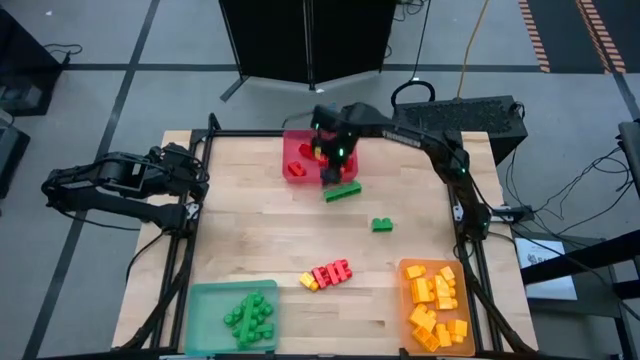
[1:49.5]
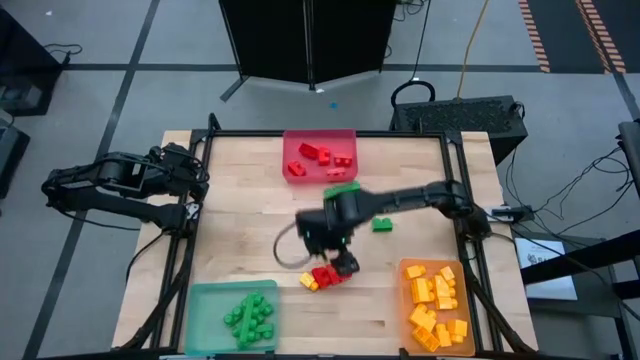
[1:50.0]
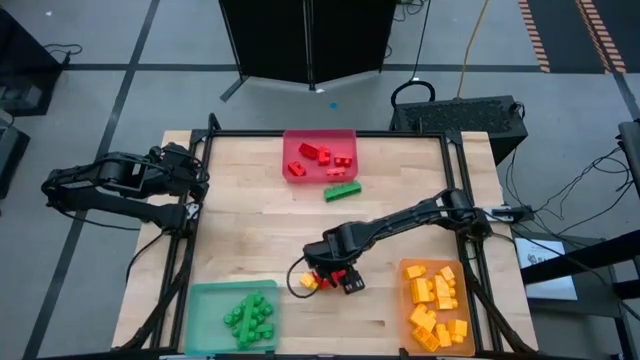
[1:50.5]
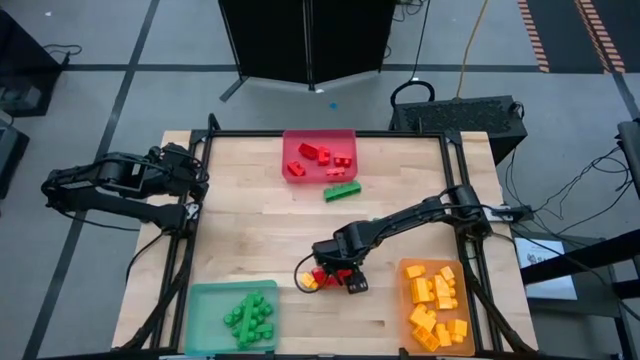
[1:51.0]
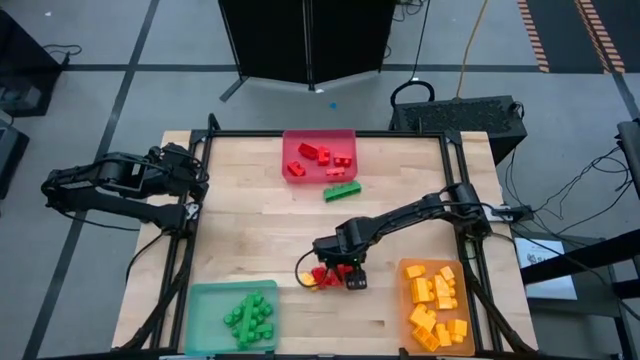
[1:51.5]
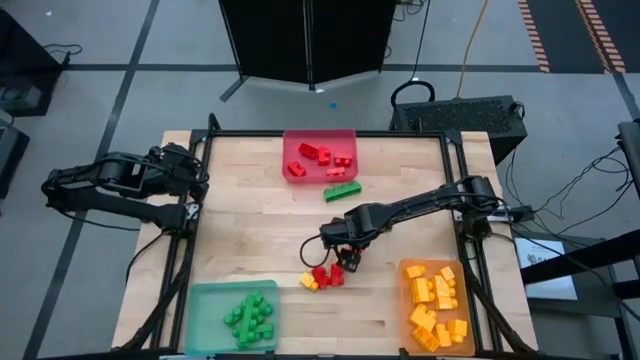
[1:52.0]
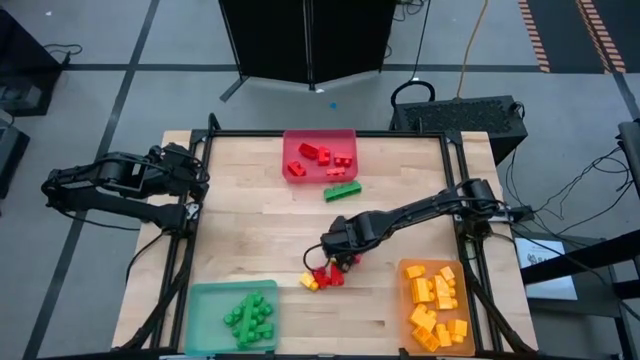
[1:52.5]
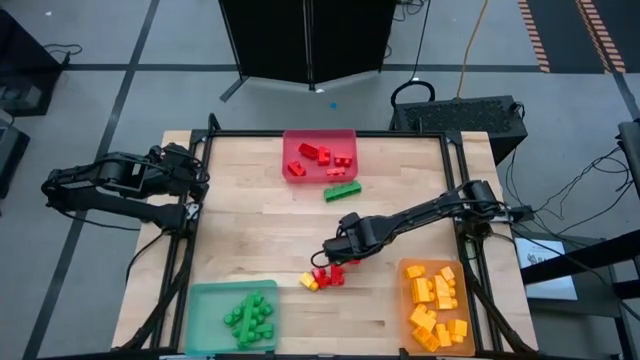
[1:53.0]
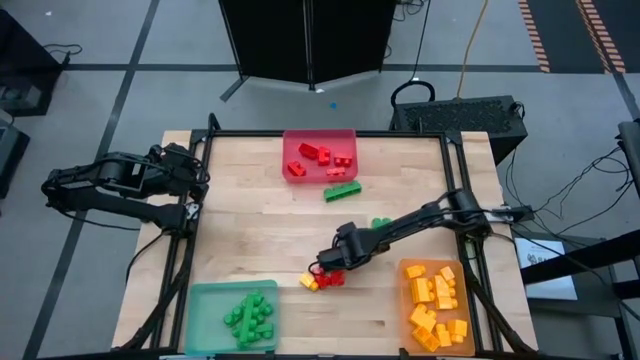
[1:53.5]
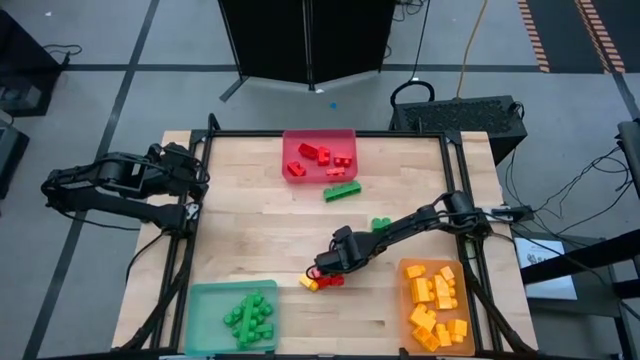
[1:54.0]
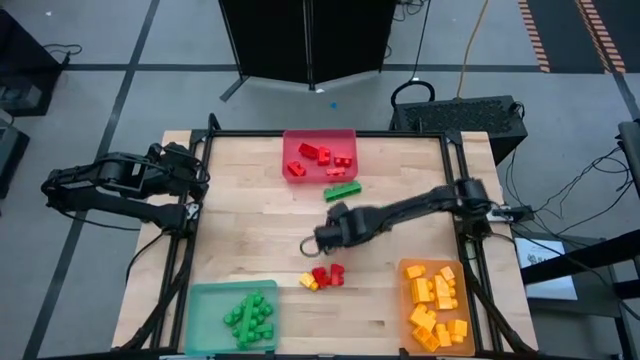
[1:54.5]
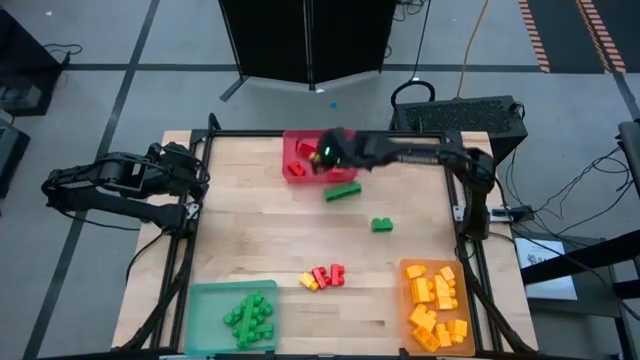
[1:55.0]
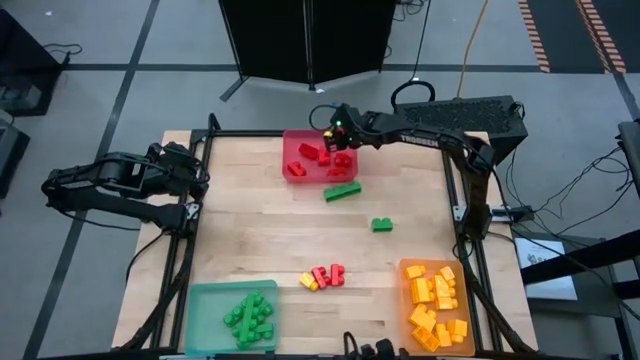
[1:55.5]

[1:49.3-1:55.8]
Task: Sort blocks
Put the red game piece into the red bin

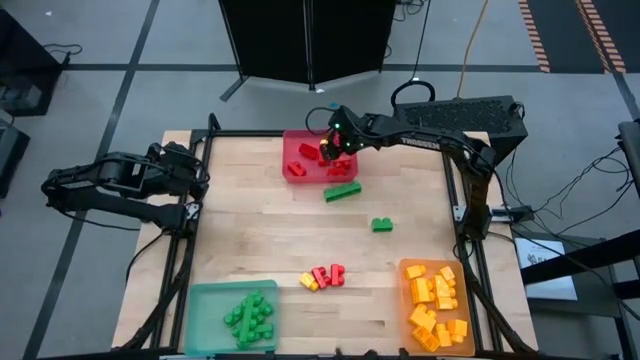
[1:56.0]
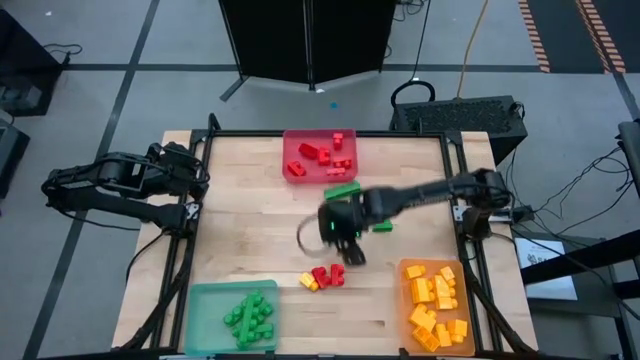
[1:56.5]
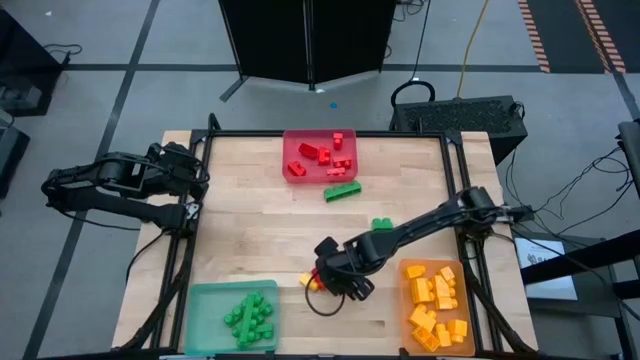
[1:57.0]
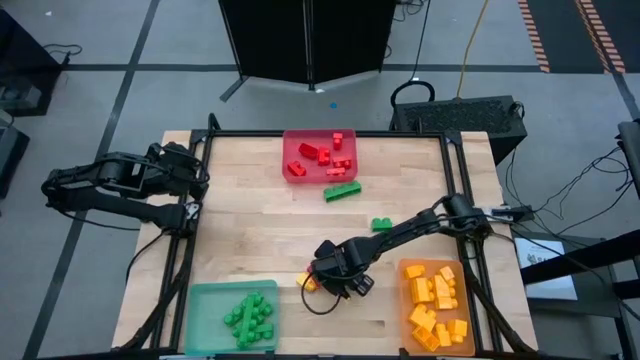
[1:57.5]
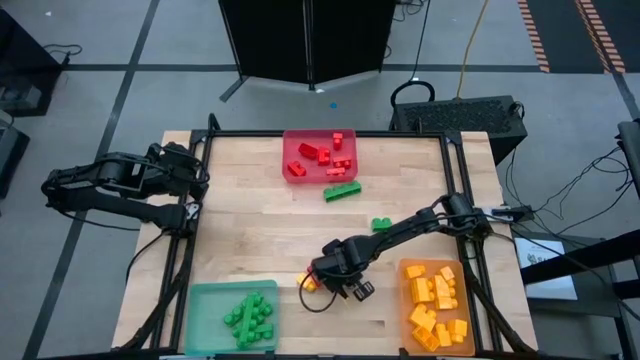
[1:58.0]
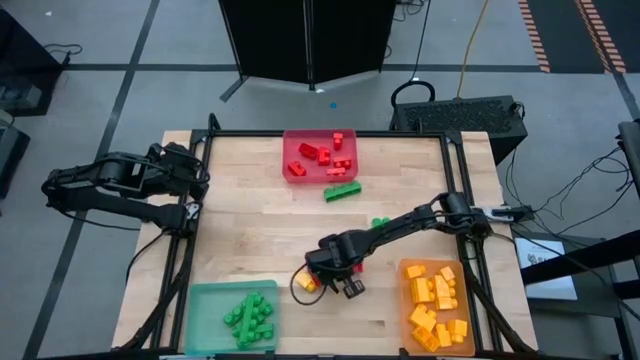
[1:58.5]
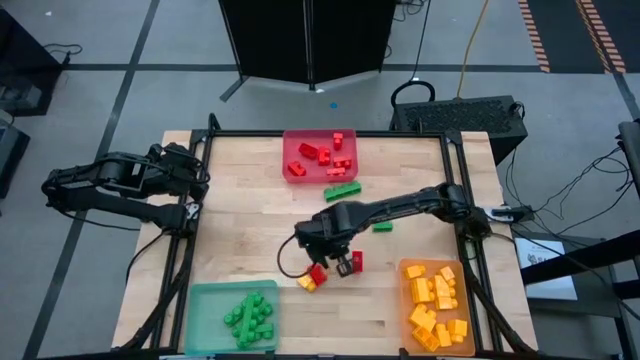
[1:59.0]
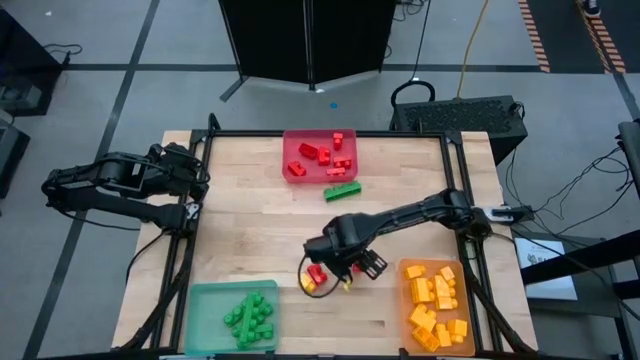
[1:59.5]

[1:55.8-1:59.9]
Put the red game piece into the red bin

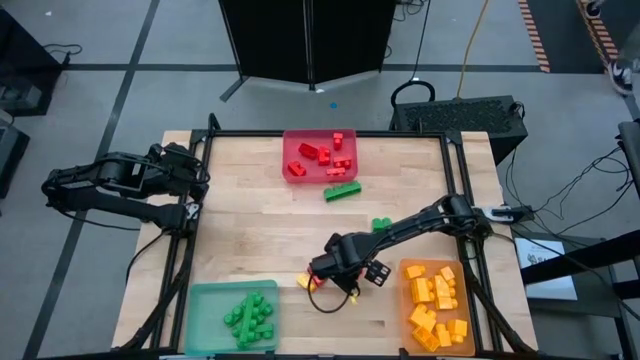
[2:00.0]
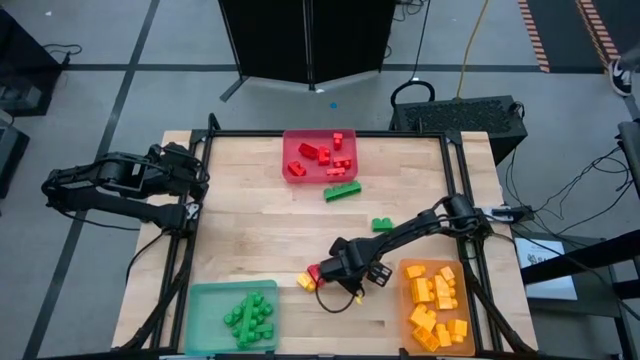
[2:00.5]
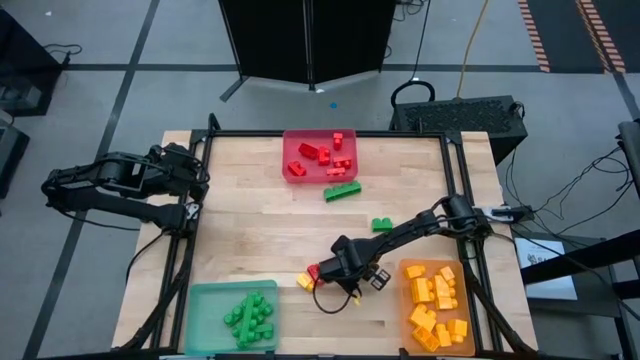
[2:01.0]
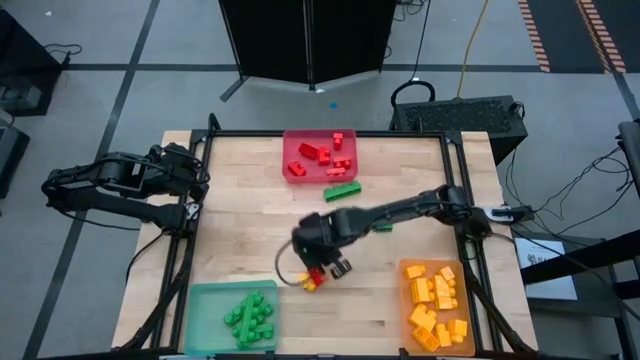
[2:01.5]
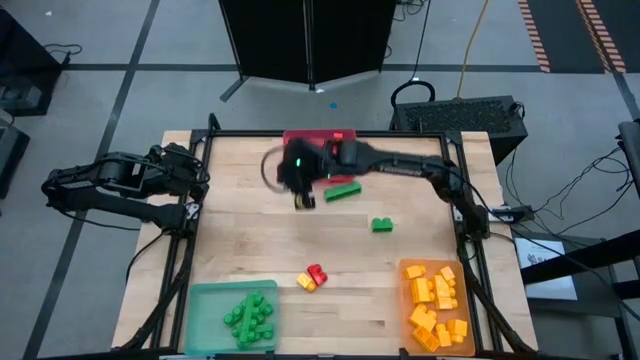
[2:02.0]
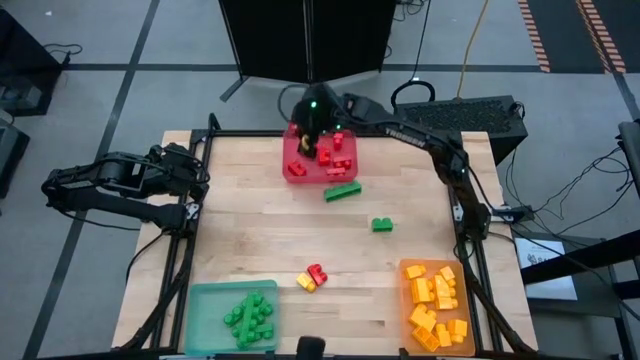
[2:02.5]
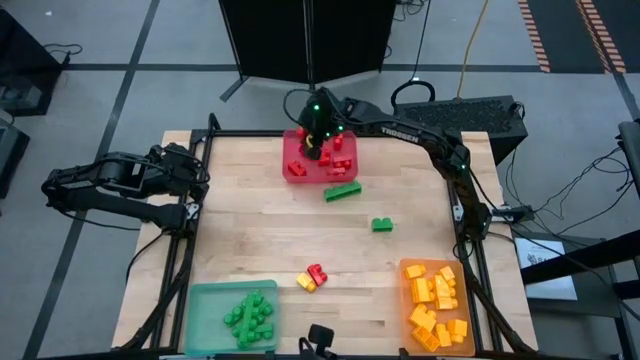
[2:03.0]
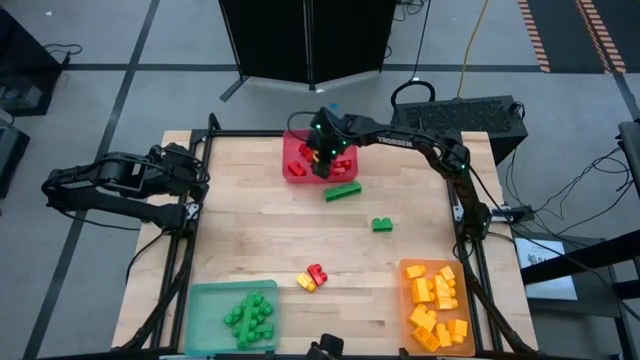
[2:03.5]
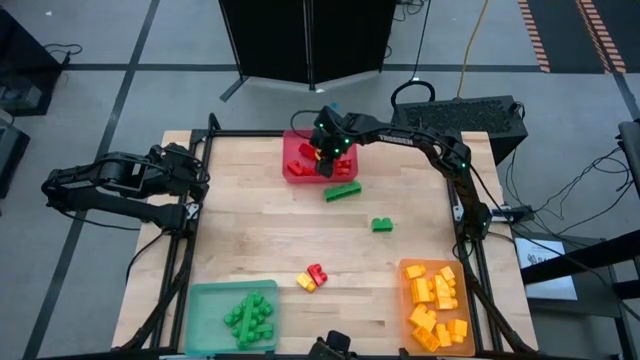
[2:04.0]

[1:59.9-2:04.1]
Put the red game piece into the red bin

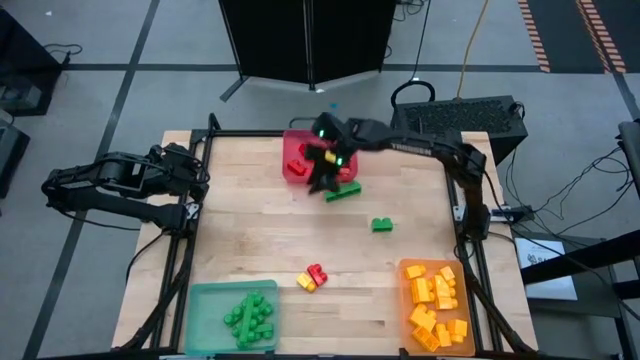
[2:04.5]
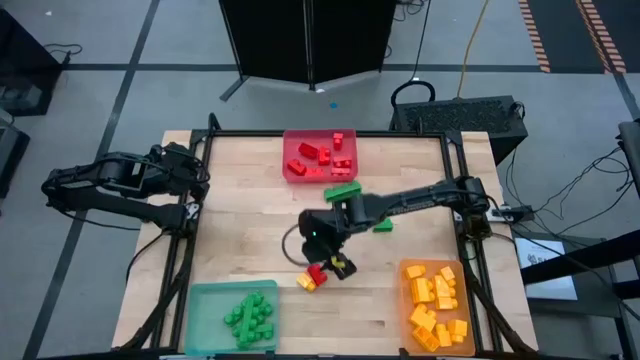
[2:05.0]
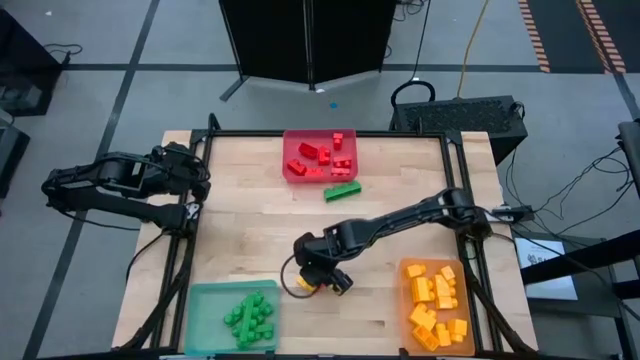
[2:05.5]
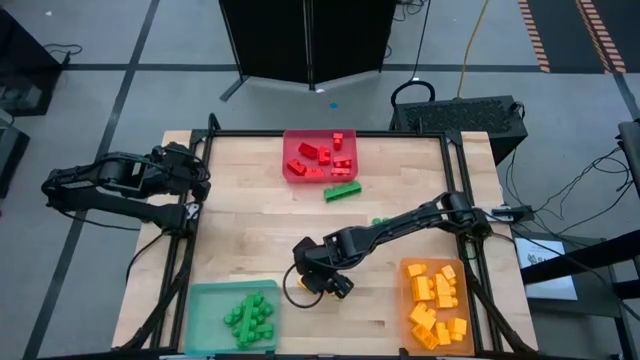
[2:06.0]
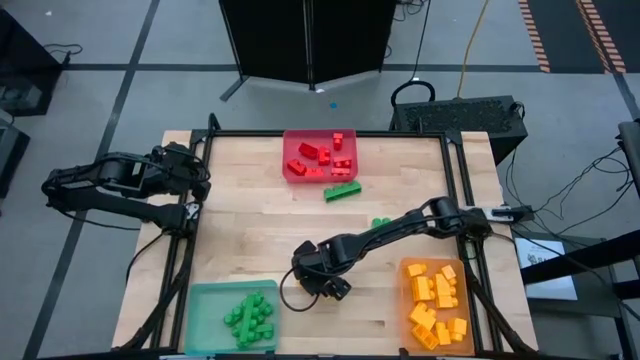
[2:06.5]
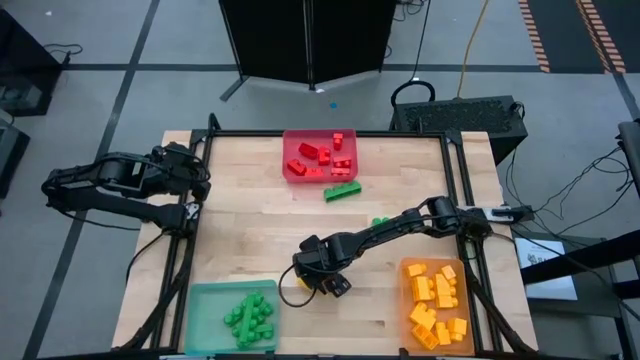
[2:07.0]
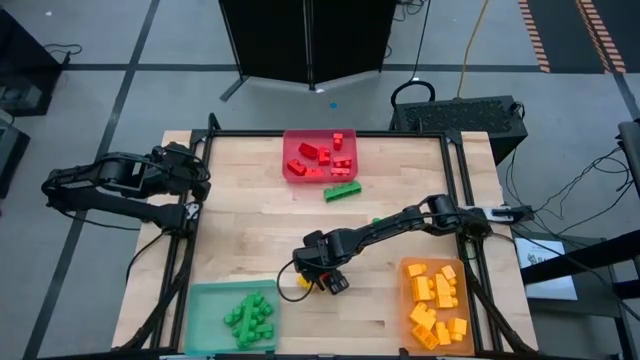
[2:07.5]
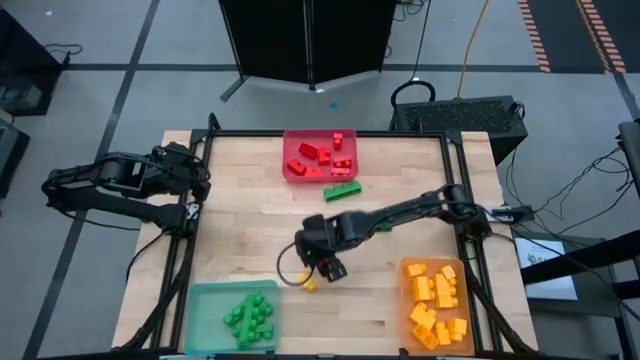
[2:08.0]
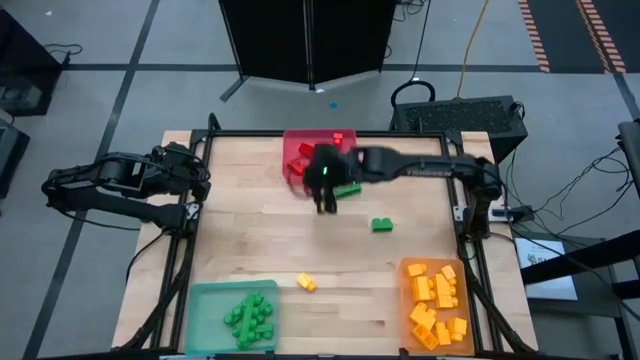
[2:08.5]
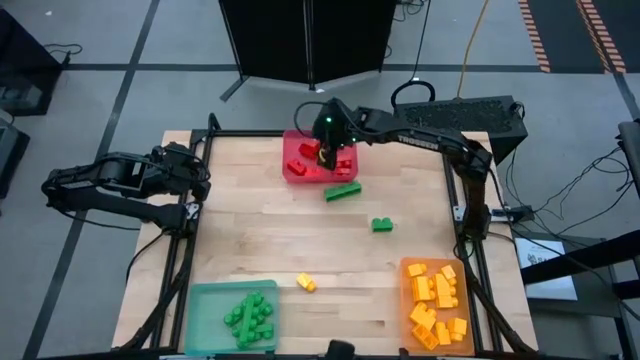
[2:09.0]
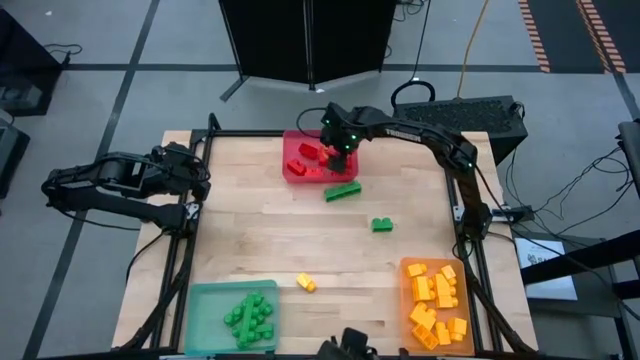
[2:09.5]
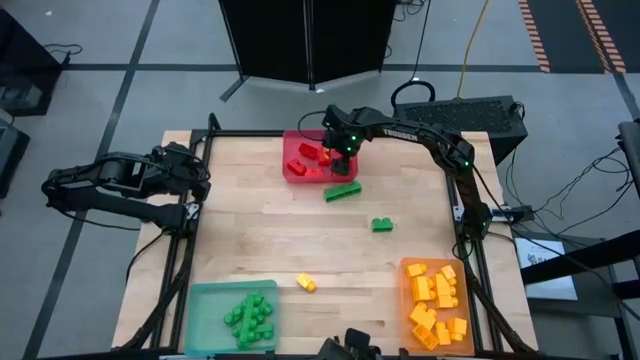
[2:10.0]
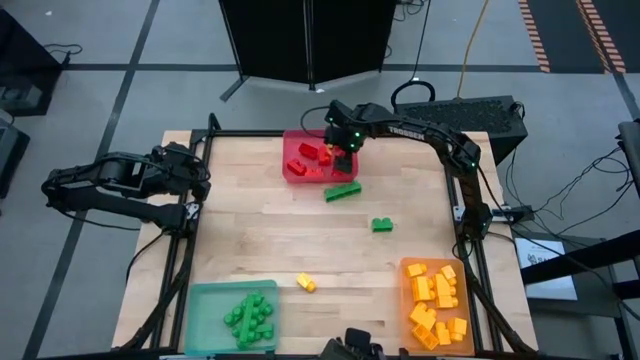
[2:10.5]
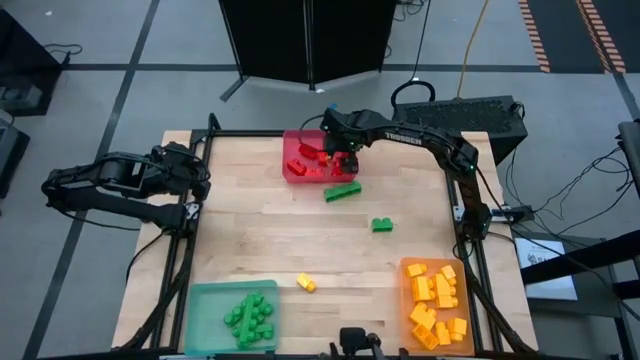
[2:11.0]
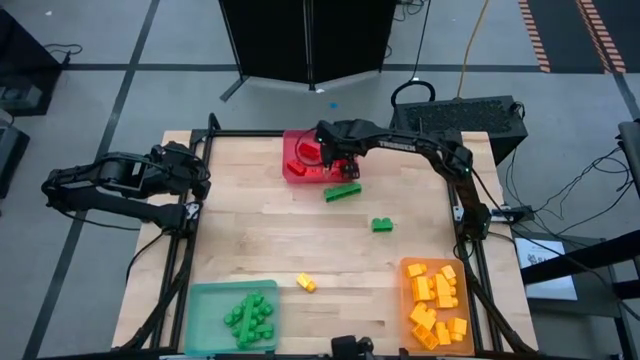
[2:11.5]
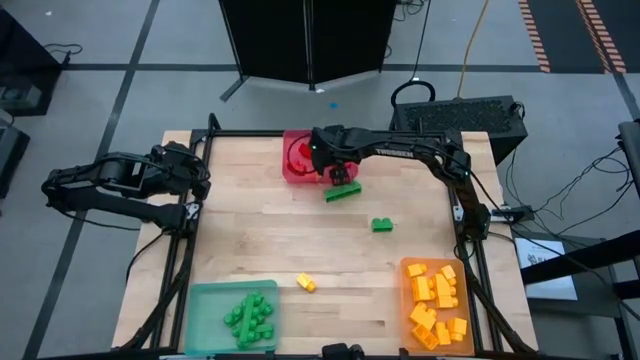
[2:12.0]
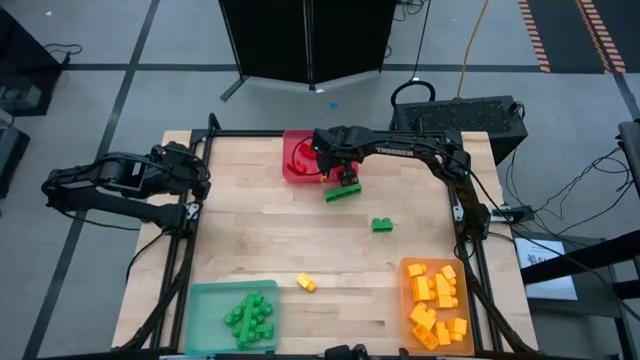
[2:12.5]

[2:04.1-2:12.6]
Put the red game piece into the red bin
